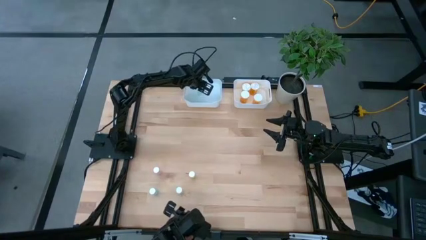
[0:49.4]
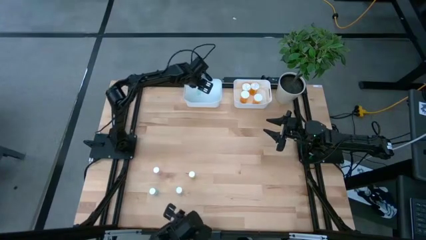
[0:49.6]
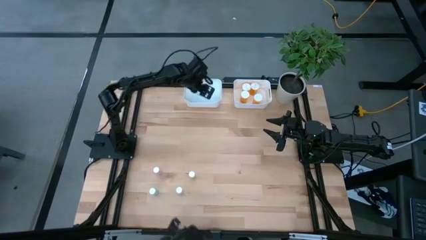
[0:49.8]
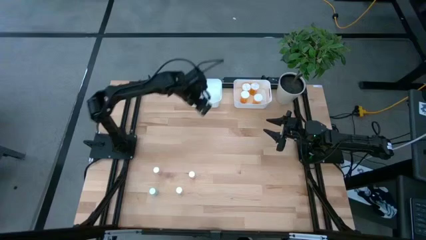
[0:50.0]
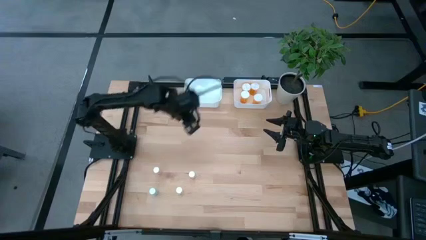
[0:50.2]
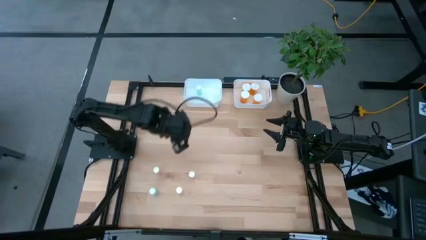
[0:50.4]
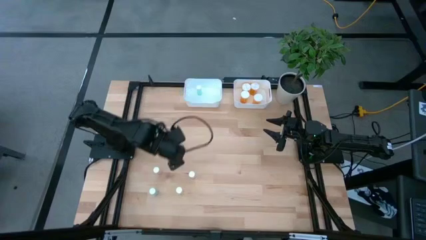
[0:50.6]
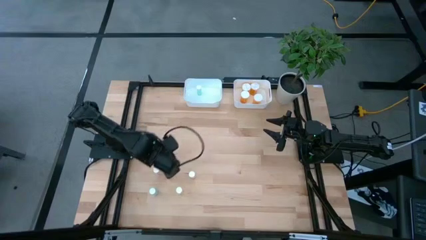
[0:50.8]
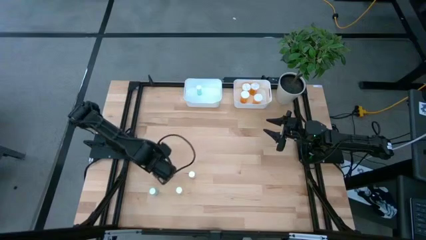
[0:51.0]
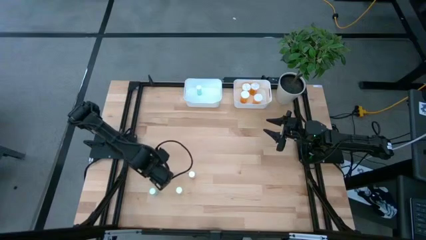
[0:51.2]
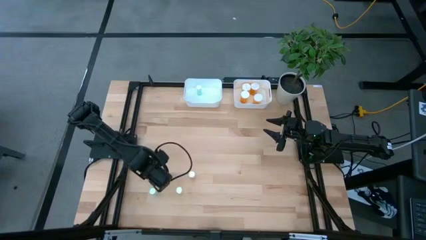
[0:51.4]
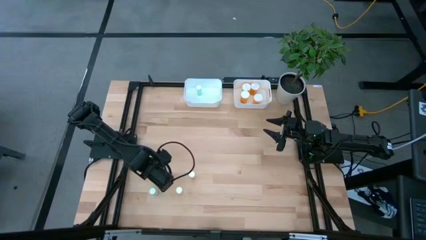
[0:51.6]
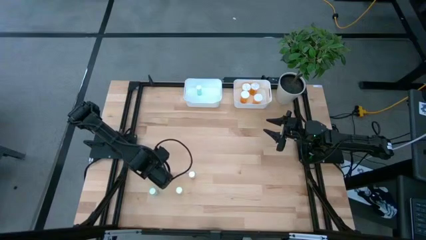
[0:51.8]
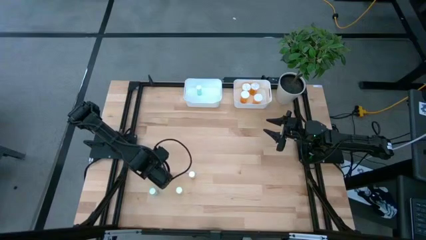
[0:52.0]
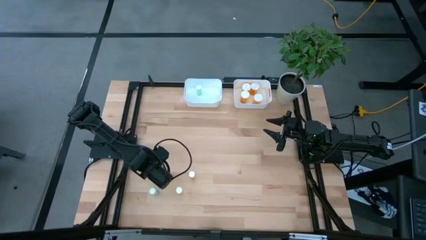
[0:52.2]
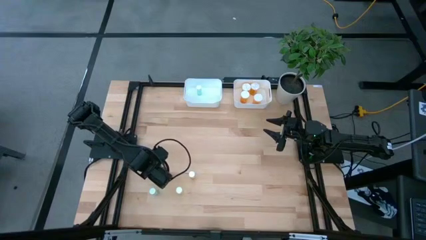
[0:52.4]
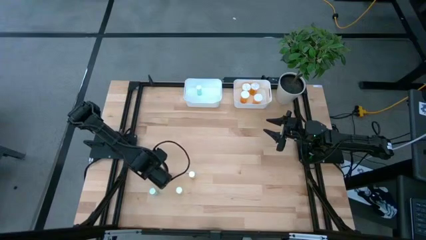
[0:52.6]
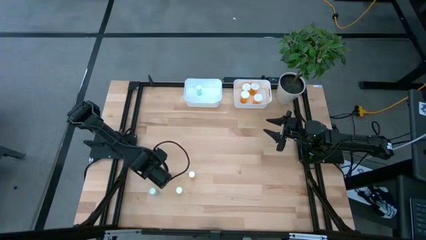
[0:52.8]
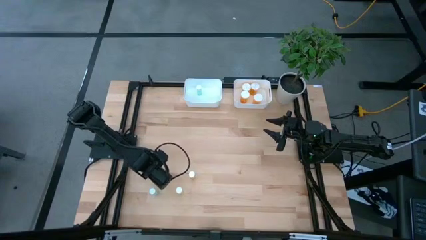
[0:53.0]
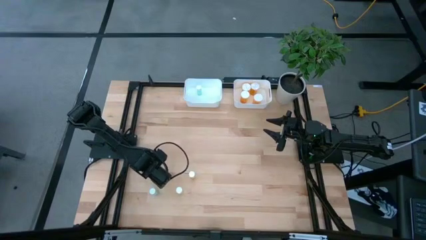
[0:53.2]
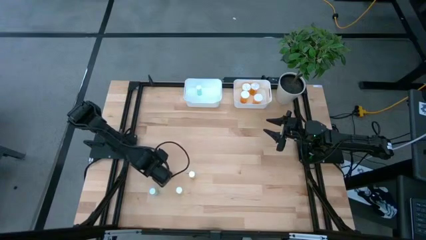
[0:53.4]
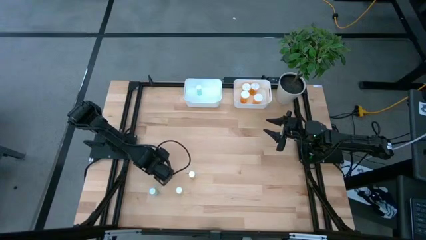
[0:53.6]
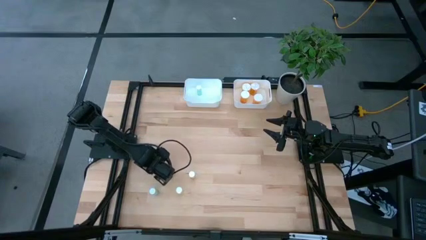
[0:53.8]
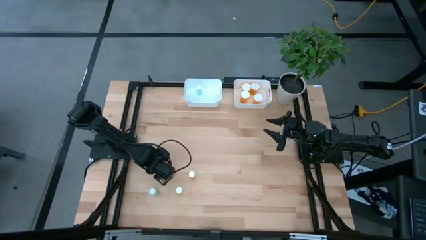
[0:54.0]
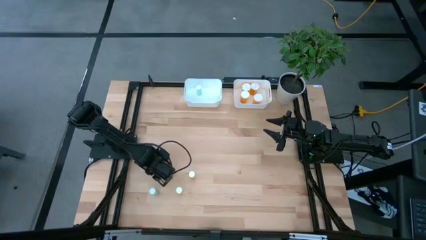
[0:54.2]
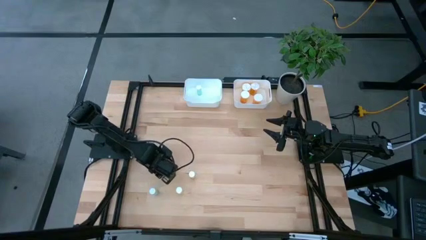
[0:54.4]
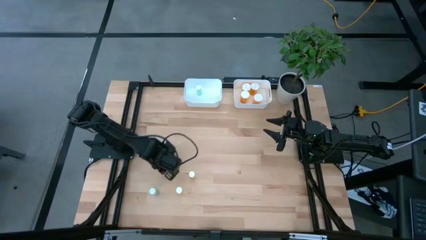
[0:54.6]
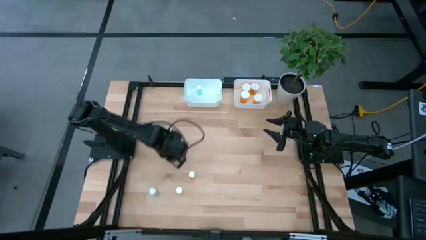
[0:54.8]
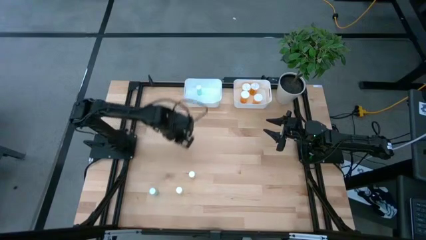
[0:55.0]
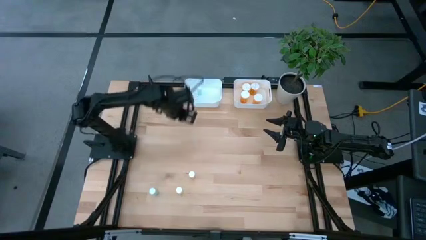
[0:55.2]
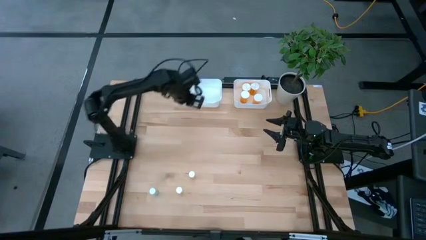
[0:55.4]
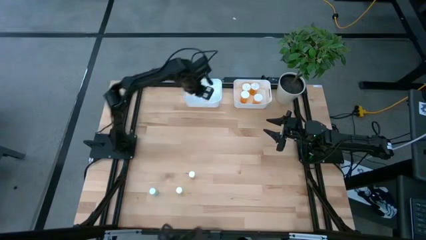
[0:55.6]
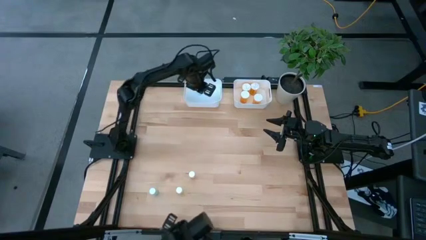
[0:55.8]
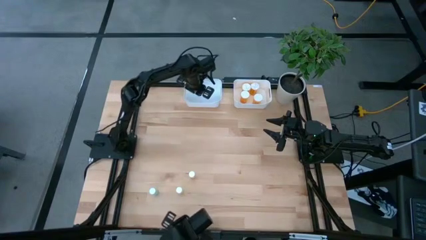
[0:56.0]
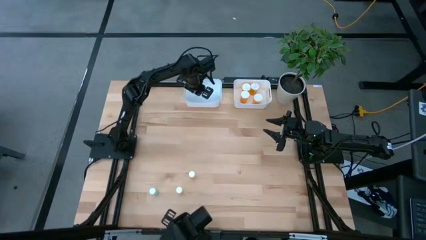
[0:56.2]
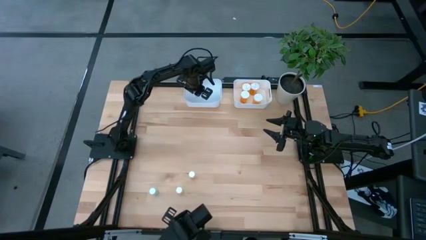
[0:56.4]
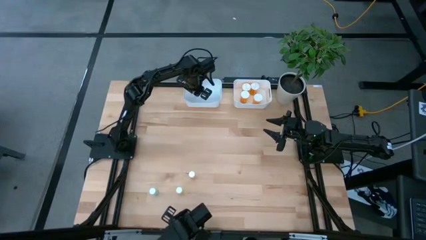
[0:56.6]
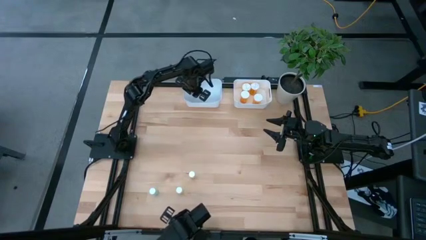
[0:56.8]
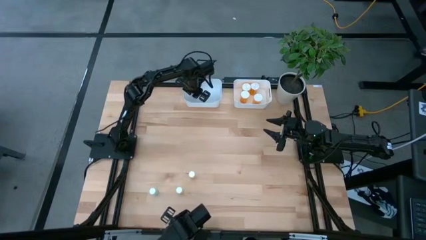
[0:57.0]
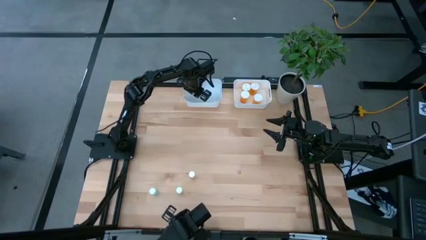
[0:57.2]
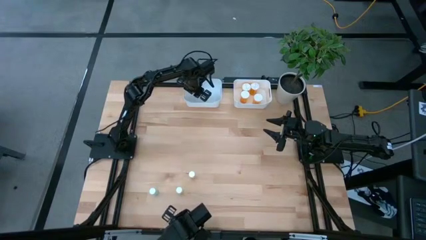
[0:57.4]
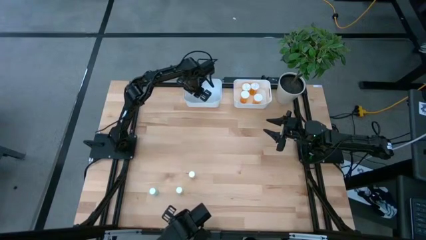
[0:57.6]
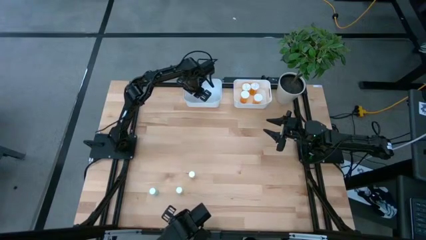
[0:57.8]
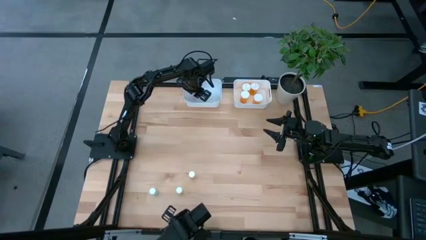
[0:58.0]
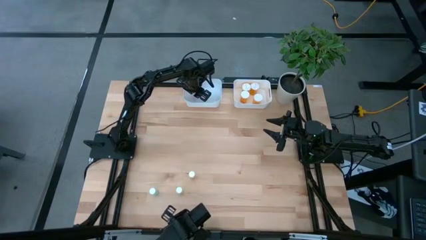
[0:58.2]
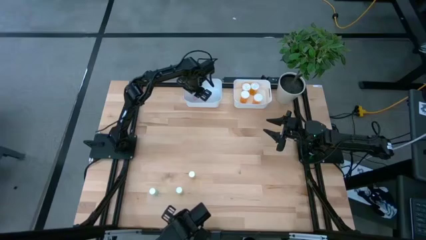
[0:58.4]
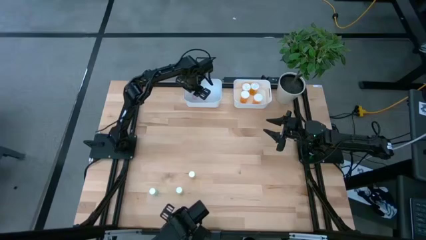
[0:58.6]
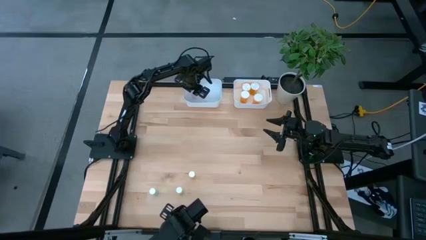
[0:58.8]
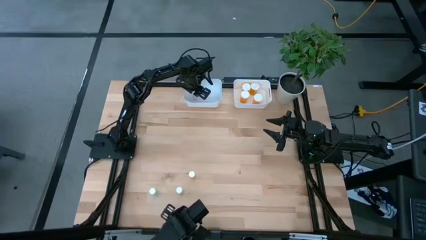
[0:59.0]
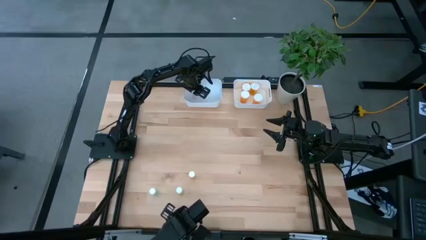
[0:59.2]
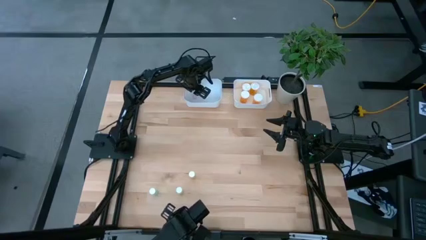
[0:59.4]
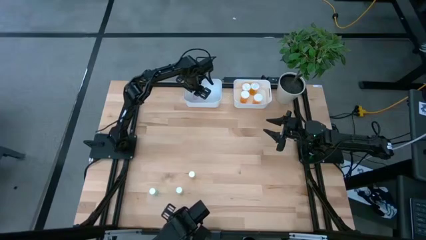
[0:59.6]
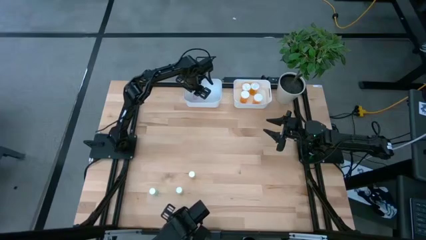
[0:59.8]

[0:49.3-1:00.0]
Task: Pick and place medicine bottles into bin by pill shape (circle, oval)
Put the pink tablet bottle into the left white bin

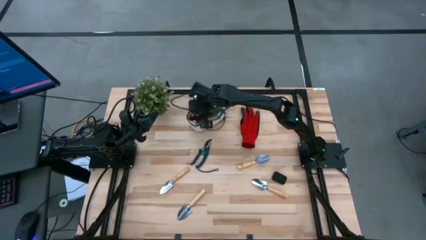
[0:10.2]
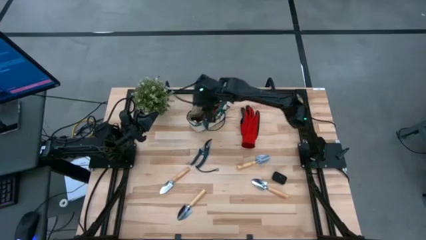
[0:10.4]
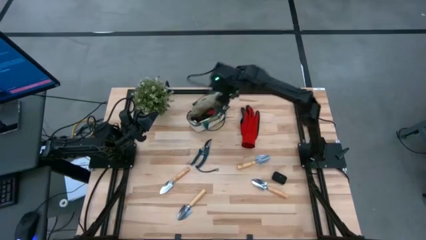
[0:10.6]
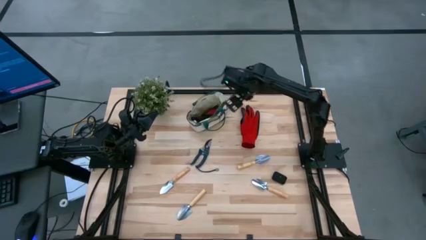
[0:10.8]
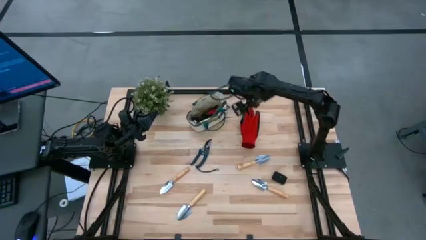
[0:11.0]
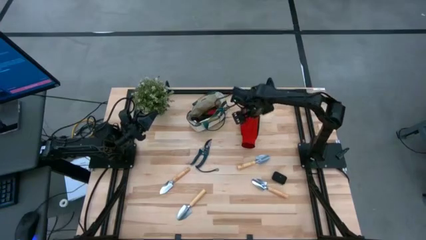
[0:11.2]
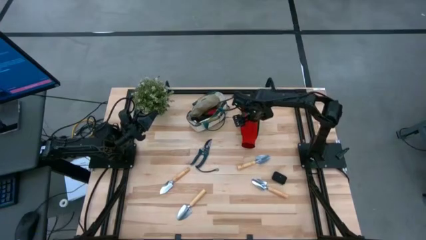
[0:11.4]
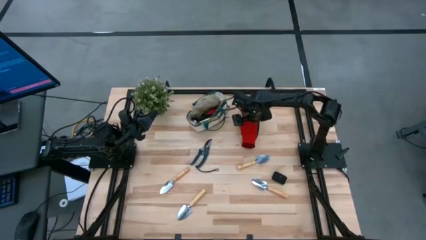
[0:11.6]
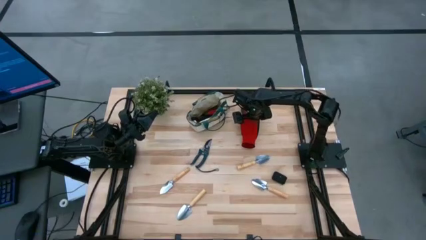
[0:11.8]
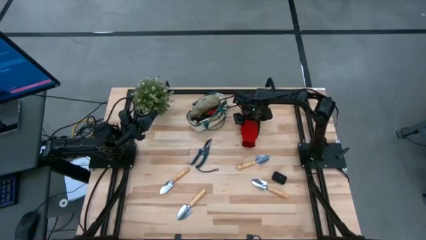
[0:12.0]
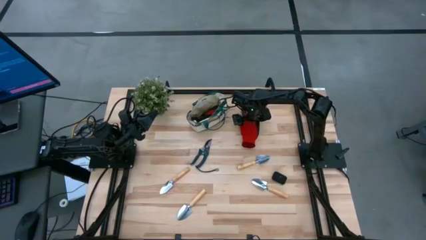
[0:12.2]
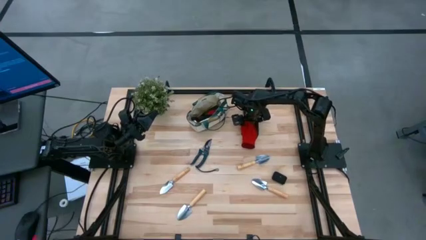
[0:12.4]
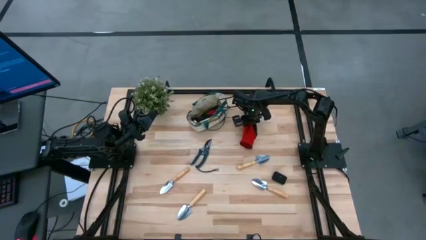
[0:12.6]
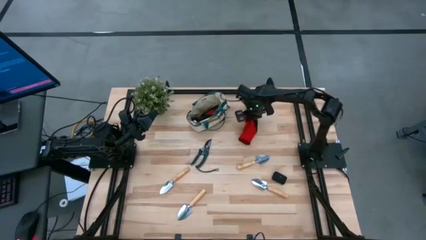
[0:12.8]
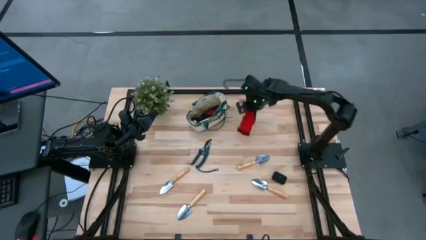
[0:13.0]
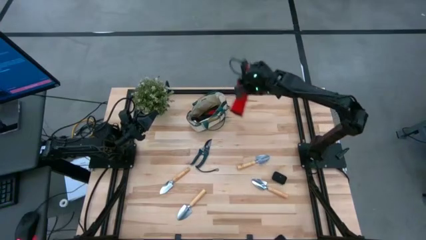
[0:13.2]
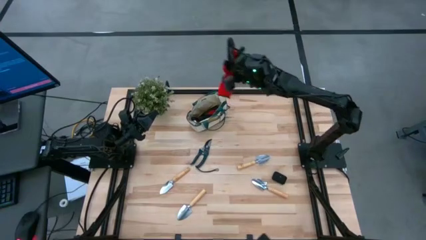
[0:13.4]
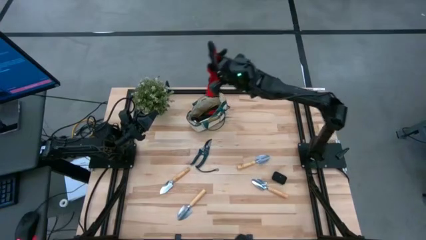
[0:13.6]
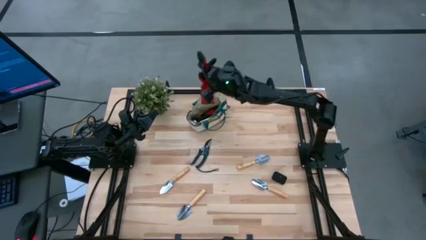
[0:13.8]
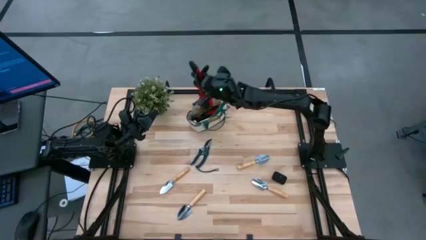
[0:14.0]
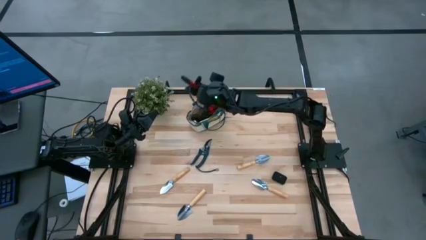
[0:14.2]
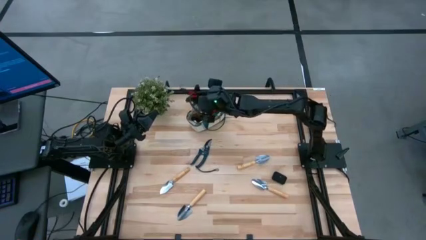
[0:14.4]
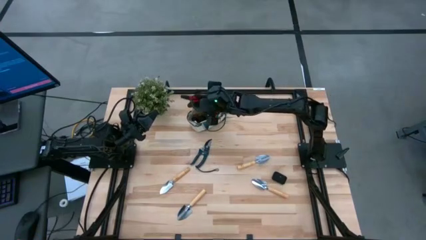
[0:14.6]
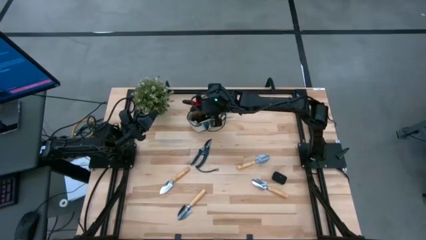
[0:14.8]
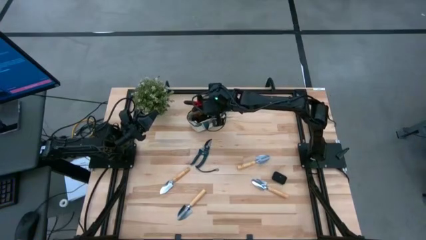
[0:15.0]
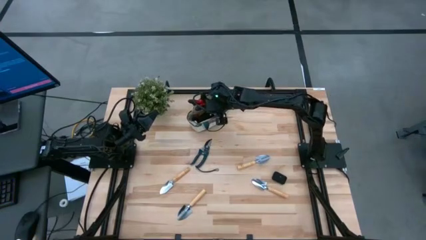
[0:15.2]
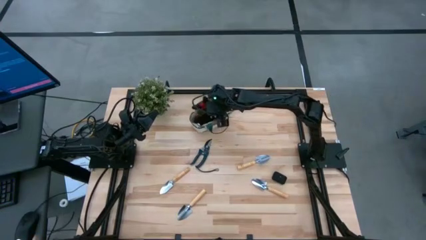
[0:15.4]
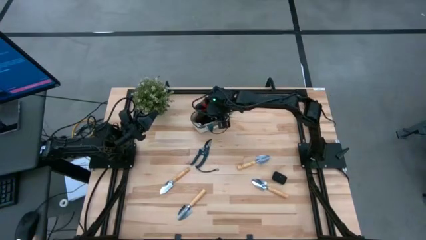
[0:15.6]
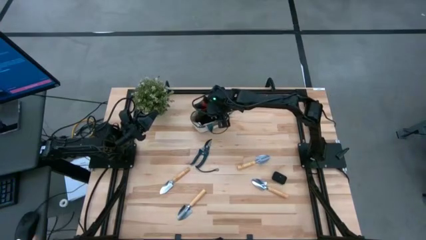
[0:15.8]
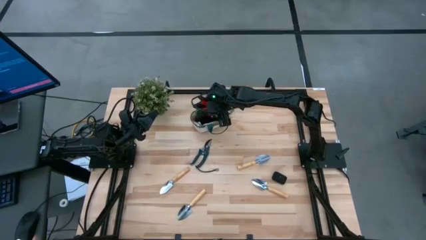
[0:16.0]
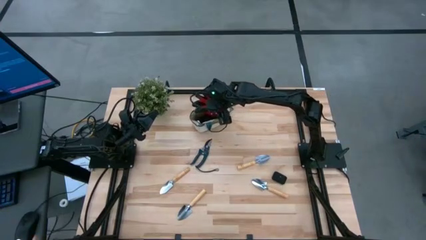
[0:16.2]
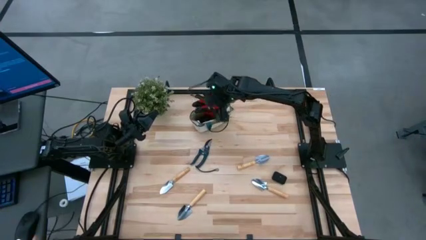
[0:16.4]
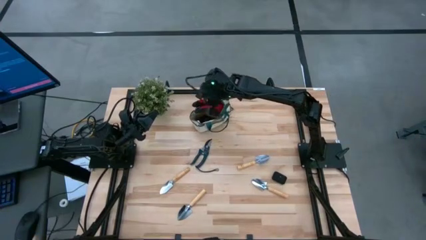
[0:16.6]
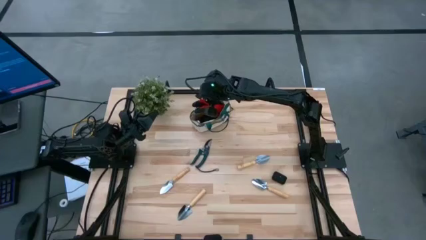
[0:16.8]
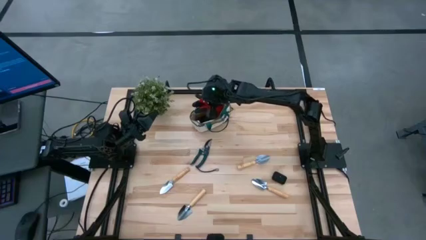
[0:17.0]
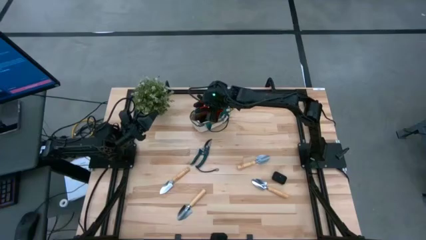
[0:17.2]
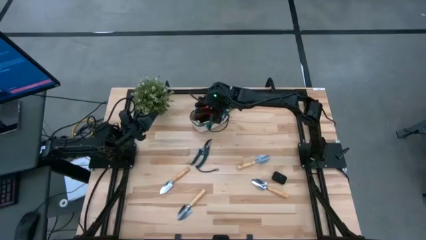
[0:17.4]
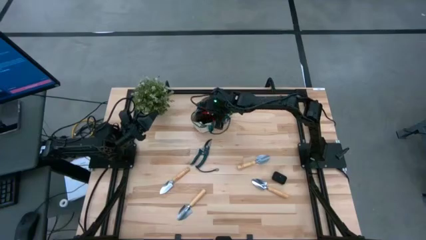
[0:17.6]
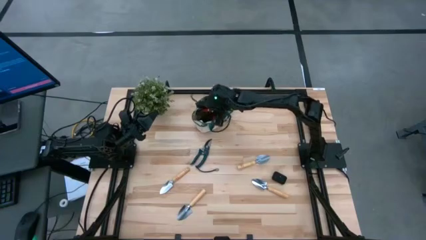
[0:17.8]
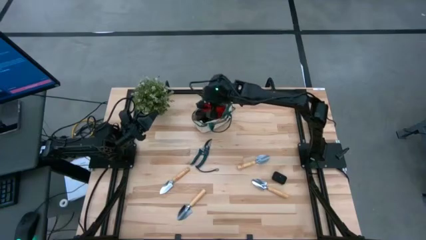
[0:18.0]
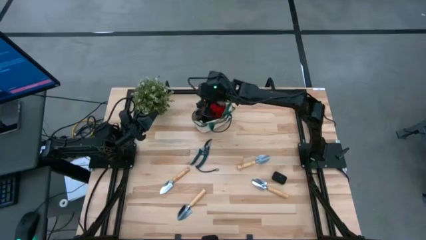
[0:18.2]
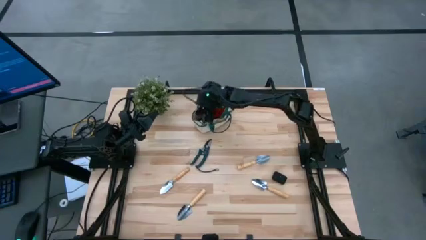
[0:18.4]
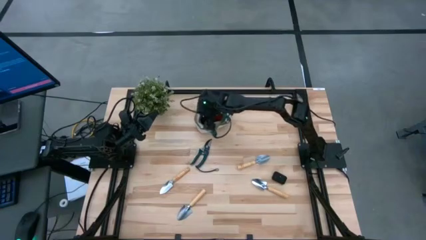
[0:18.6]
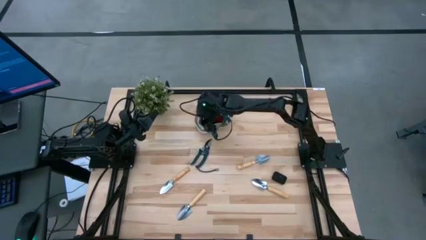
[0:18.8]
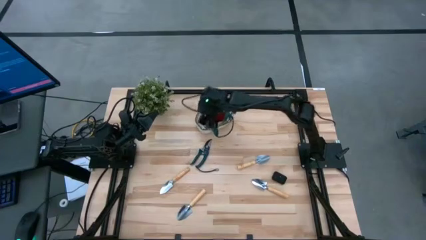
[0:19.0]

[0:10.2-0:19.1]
Task: Pick & Place Garden tools in Gardening bag
Put the red glove into the light brown gardening bag
